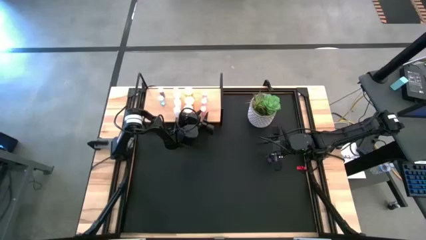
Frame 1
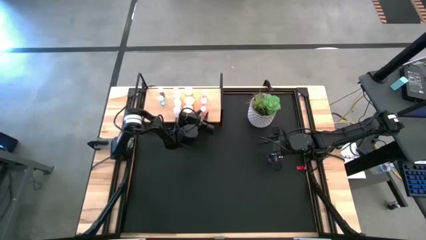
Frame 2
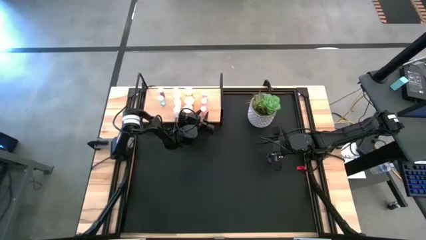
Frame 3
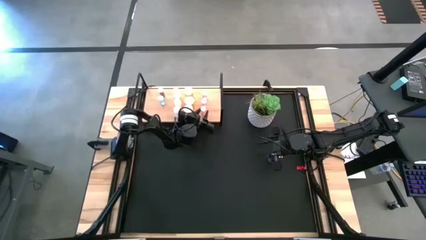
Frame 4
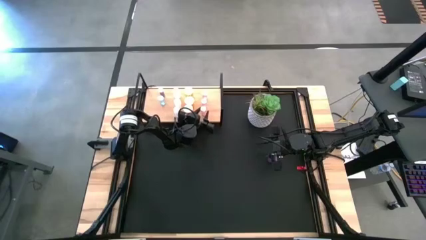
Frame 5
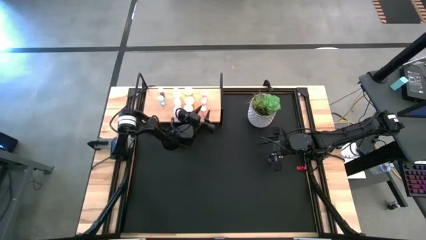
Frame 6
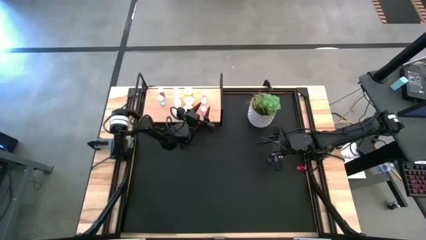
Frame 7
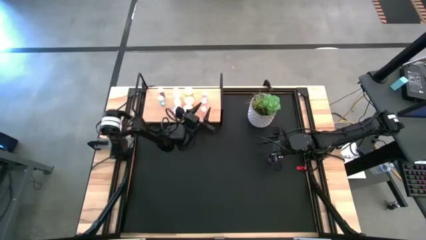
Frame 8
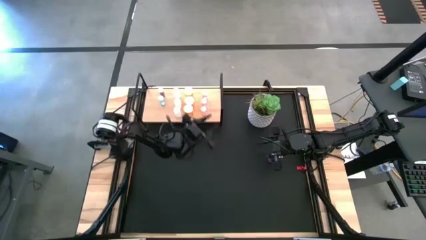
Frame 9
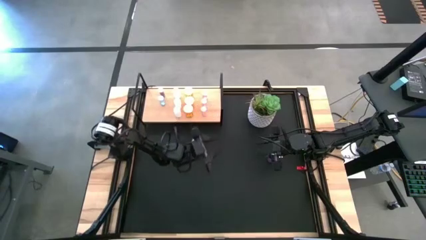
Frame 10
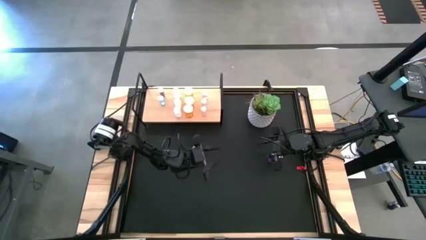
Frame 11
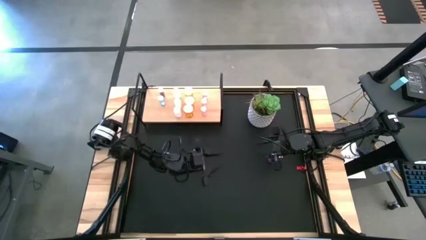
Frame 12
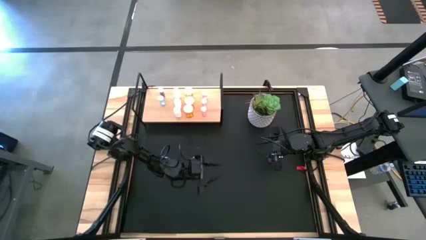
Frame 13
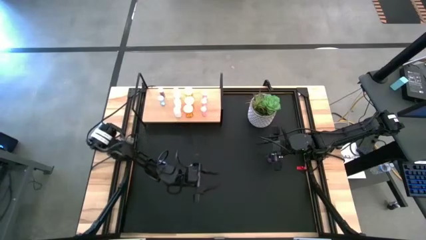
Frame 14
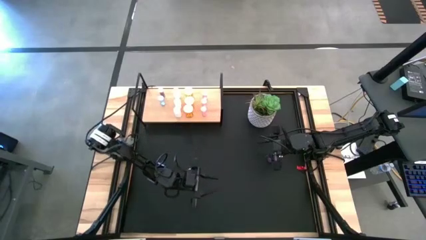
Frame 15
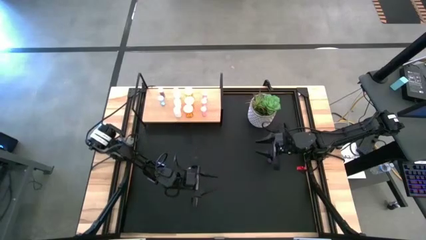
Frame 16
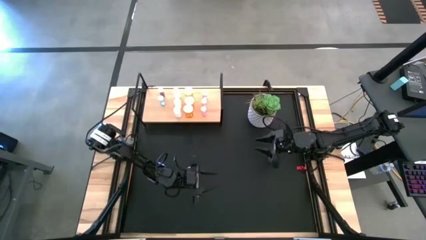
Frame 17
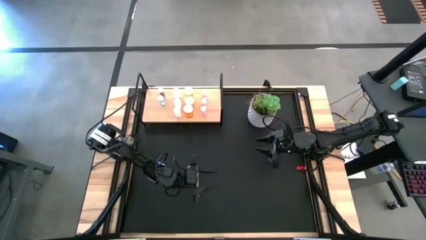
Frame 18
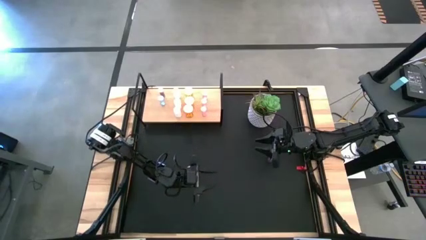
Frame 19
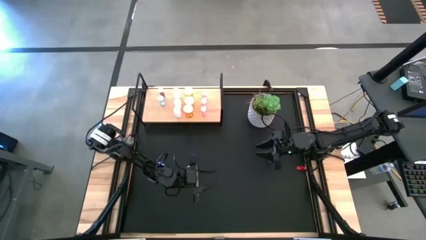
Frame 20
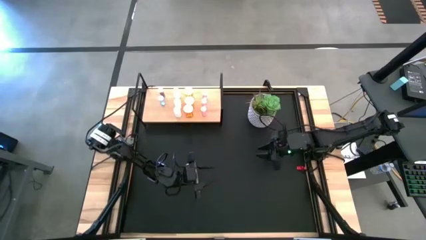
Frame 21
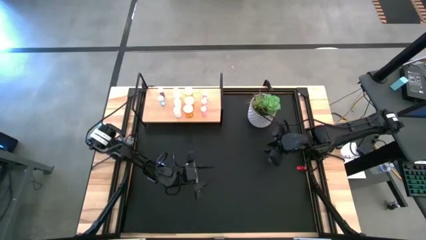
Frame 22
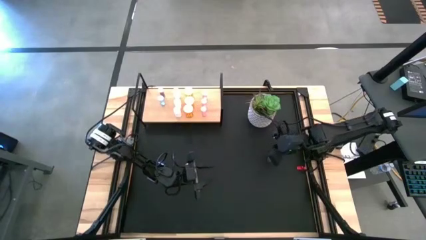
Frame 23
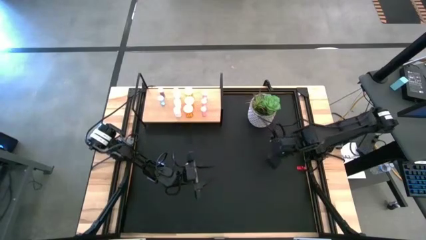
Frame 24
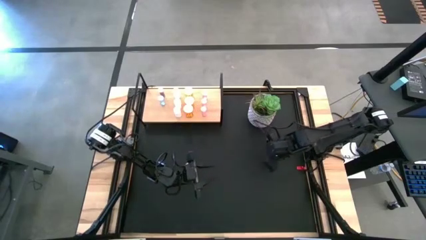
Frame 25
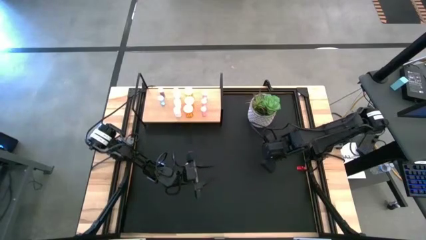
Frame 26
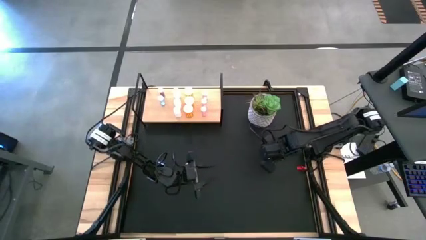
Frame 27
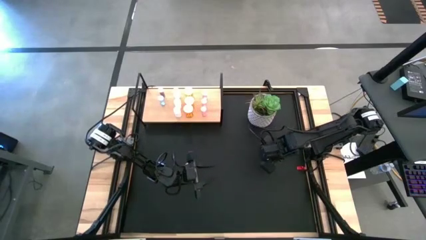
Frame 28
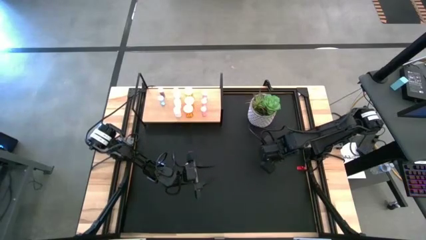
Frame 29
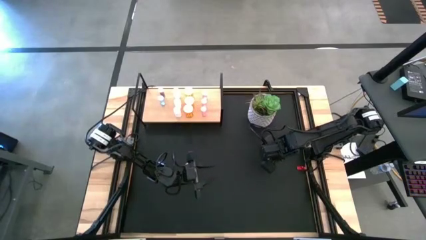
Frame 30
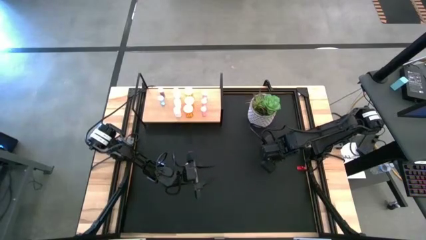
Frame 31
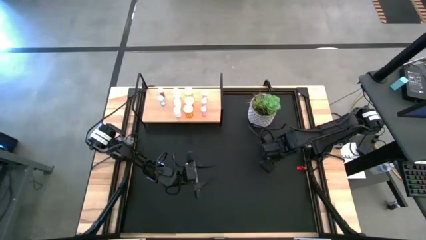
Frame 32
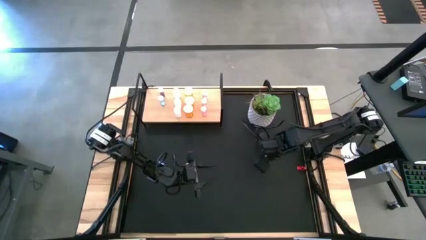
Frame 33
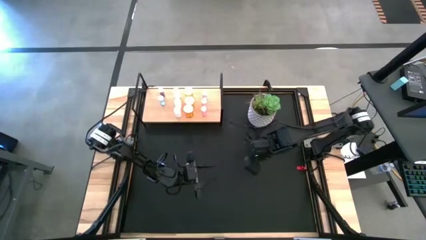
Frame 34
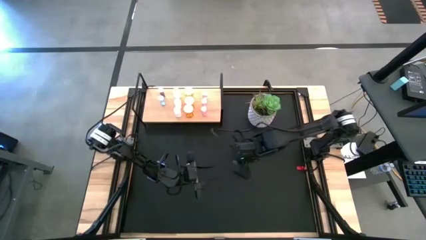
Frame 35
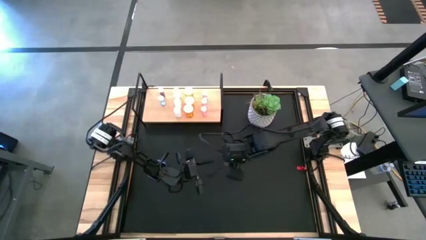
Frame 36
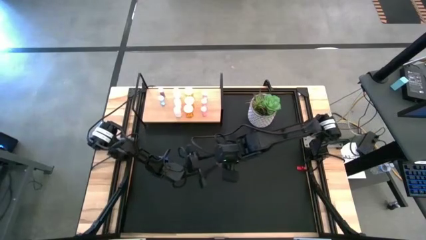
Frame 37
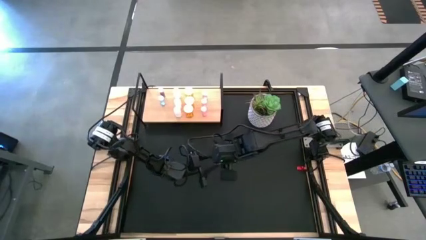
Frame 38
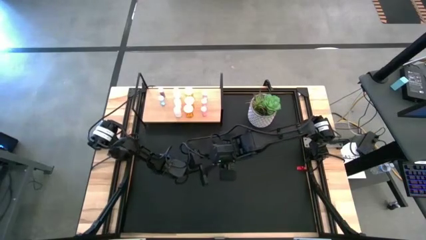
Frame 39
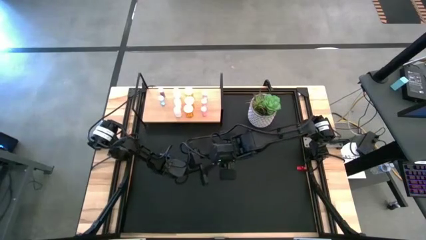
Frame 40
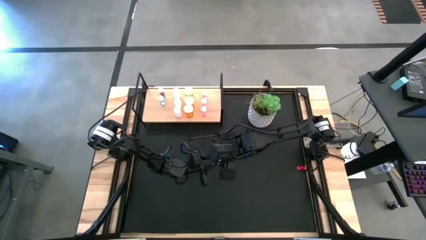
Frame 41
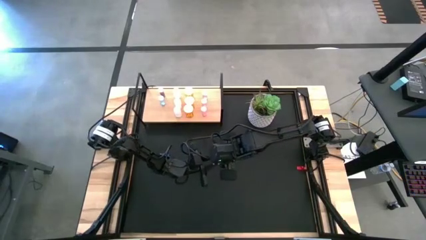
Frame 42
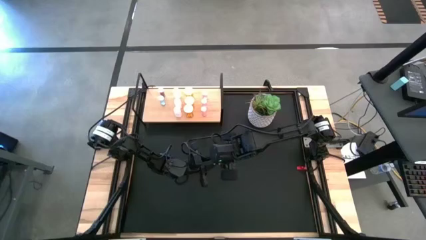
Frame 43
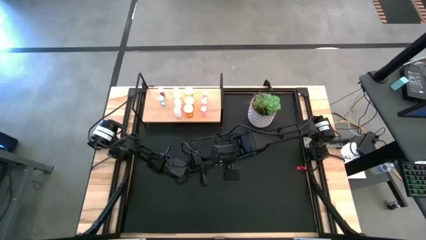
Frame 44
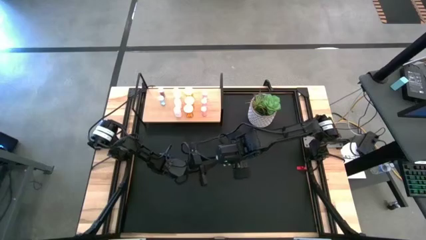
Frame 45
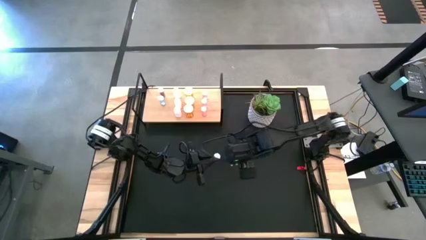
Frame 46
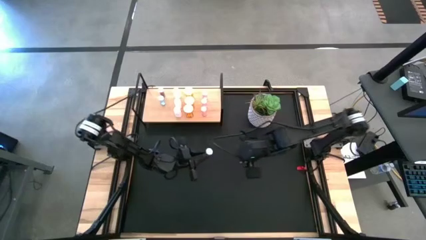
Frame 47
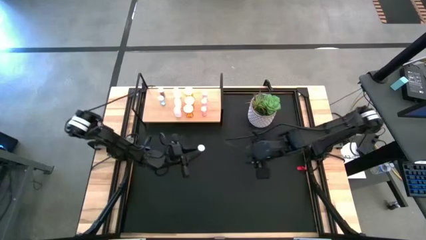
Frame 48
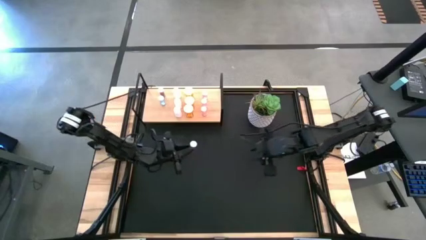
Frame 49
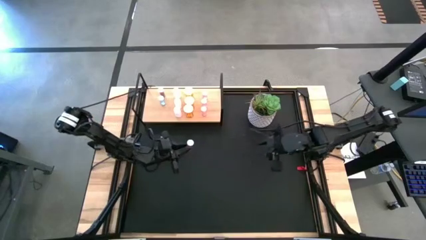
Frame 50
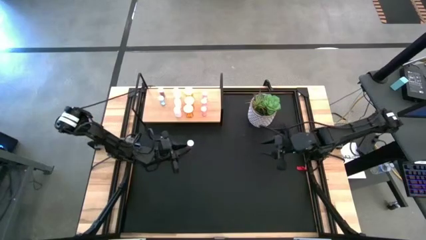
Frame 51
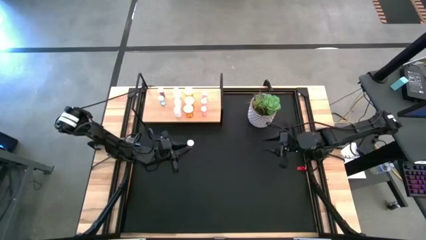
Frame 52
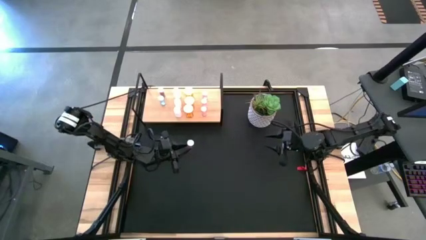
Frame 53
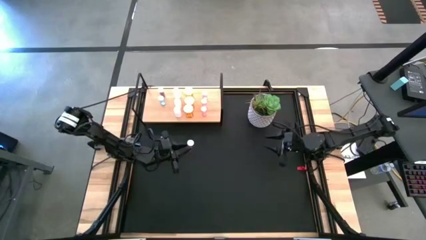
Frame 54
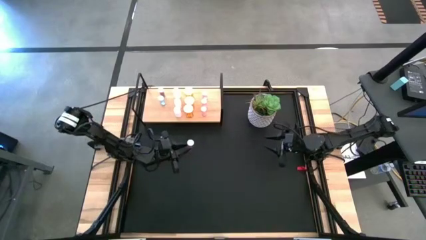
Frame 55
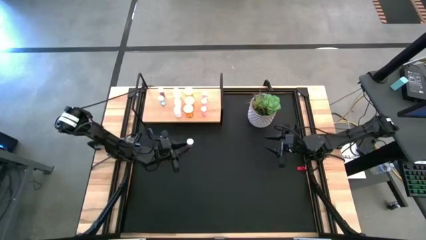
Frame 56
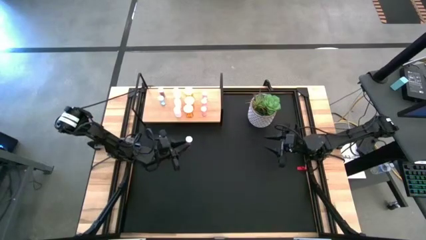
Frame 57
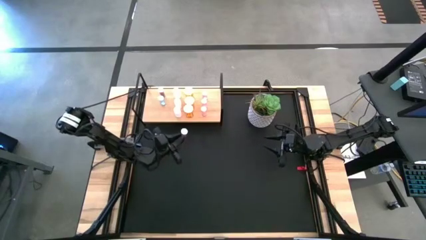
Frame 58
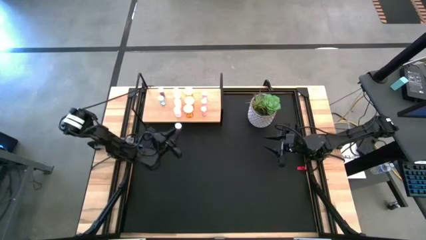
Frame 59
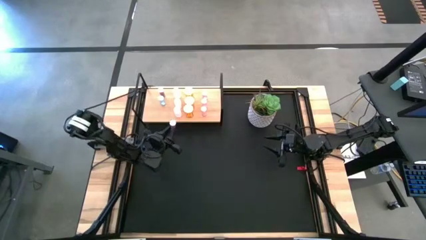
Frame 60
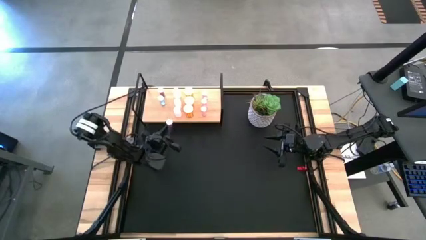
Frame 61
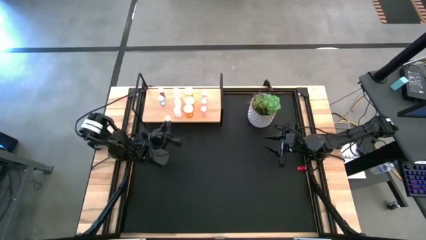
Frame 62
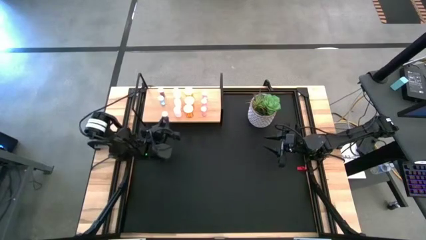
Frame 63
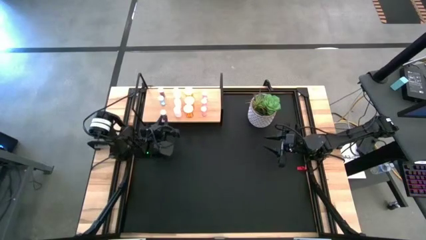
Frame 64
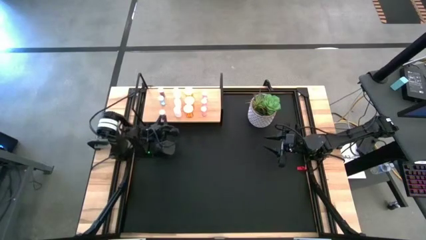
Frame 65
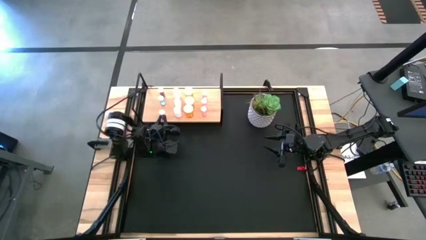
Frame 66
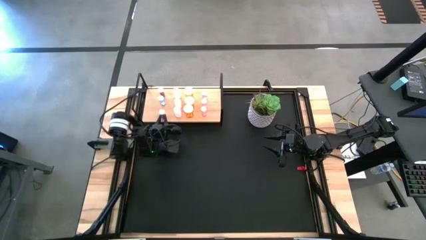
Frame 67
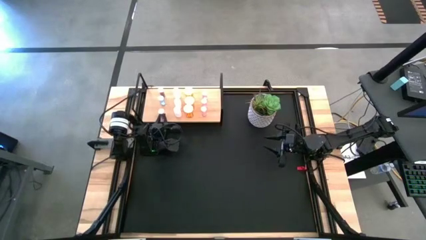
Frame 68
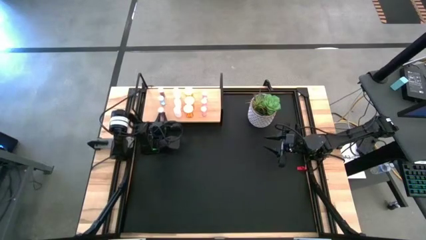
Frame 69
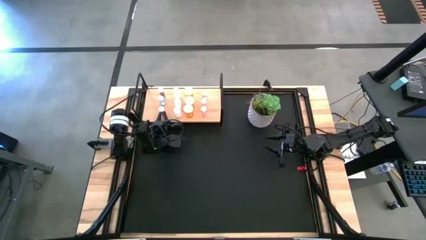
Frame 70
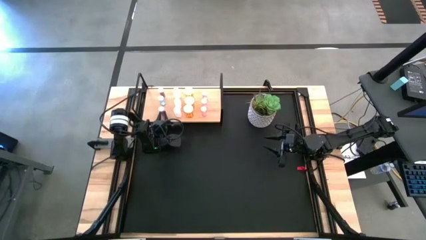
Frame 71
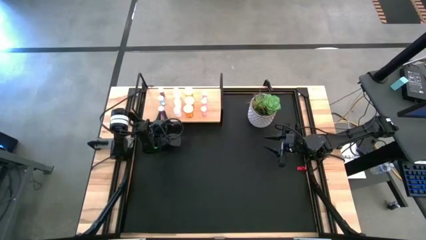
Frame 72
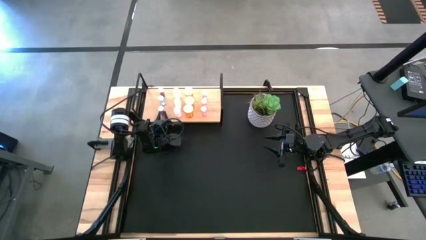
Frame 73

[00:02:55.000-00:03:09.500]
Task: Pick and place medicine bottles onto shelf by color
Put the blue pill bottle on the shelf aligned with the other blue pill bottles
